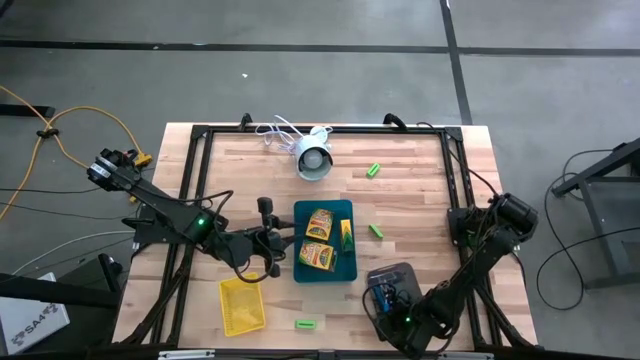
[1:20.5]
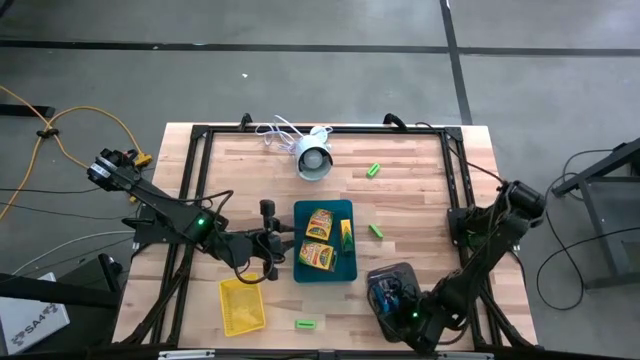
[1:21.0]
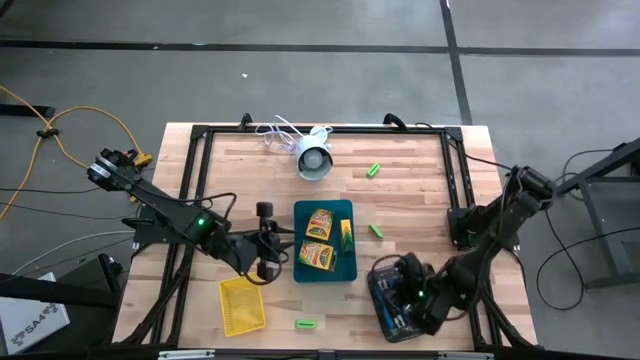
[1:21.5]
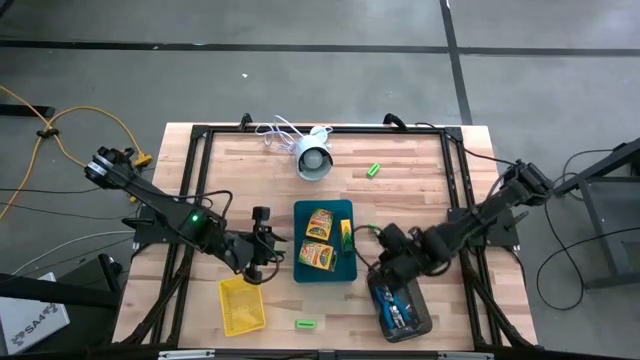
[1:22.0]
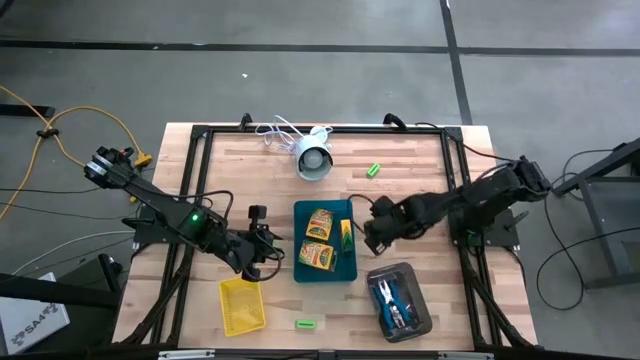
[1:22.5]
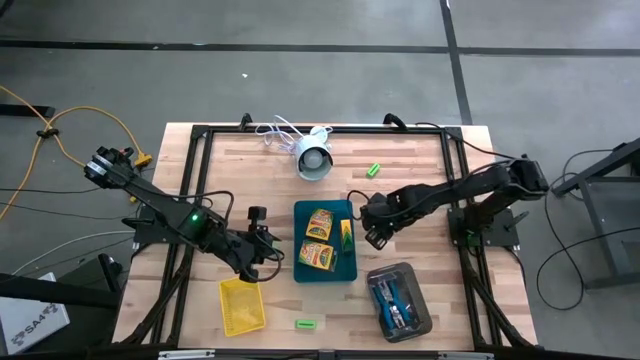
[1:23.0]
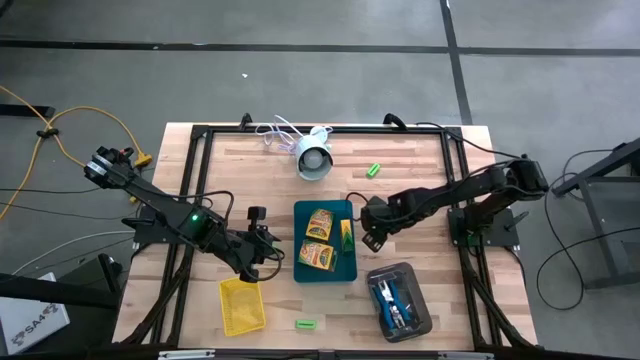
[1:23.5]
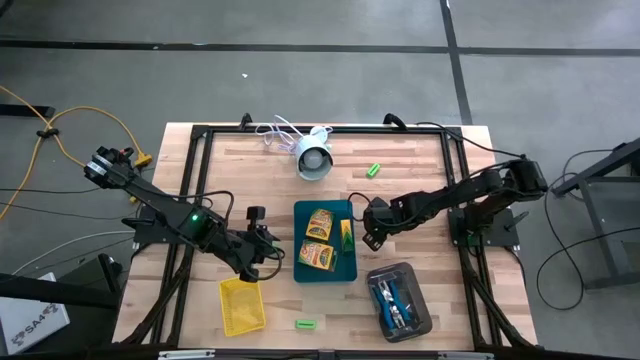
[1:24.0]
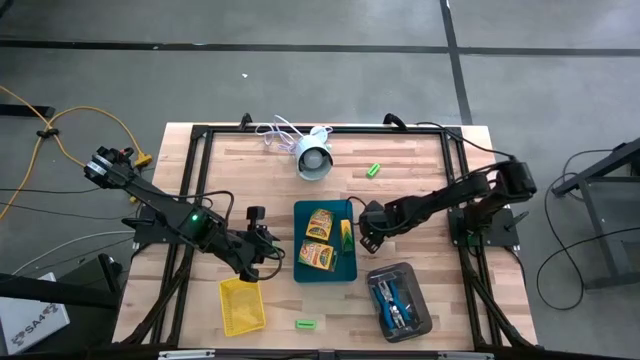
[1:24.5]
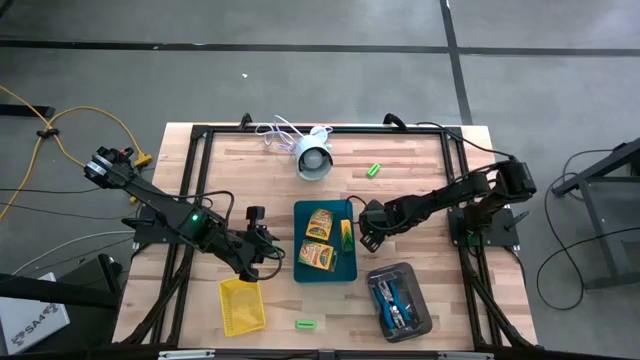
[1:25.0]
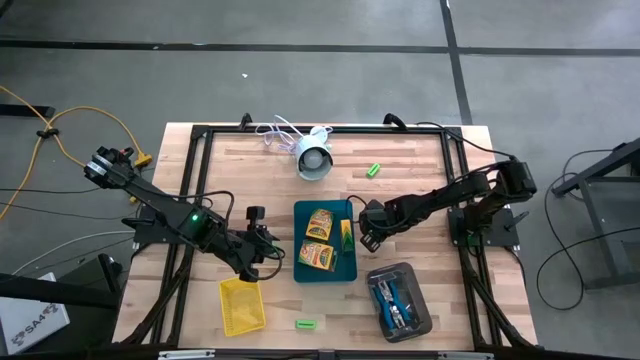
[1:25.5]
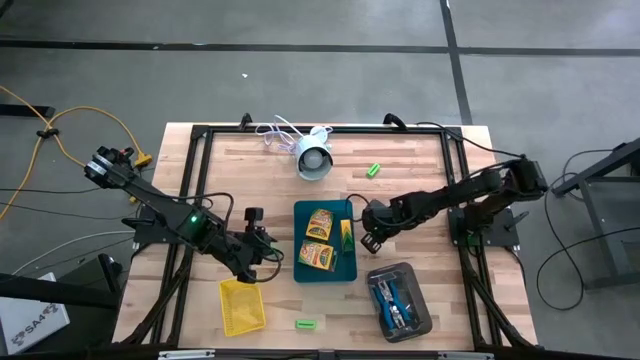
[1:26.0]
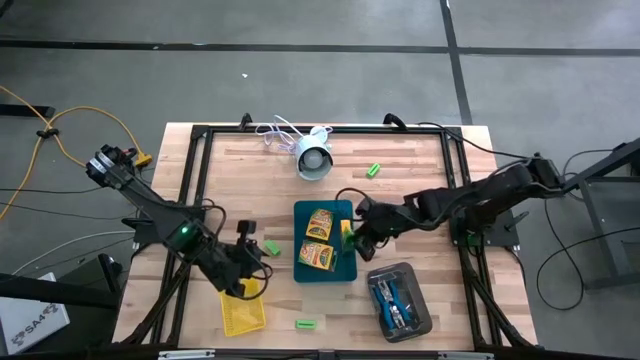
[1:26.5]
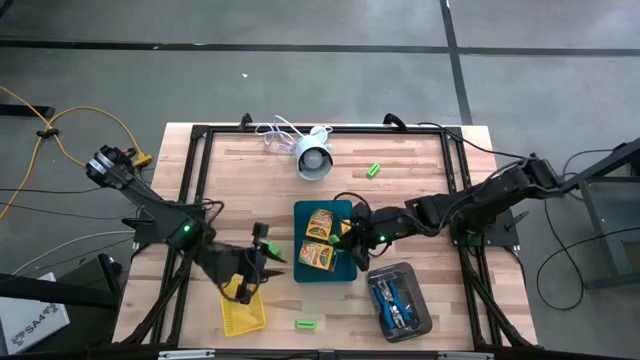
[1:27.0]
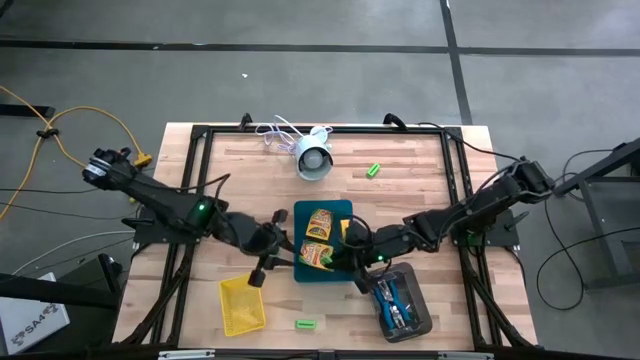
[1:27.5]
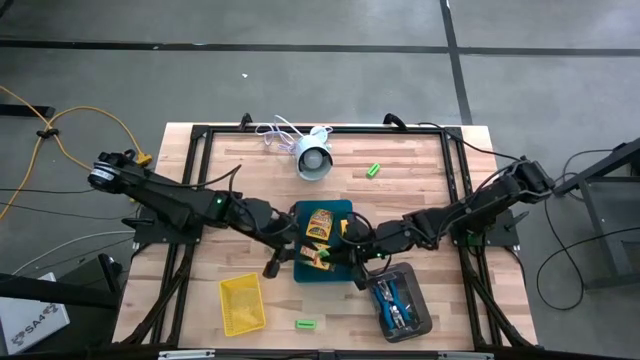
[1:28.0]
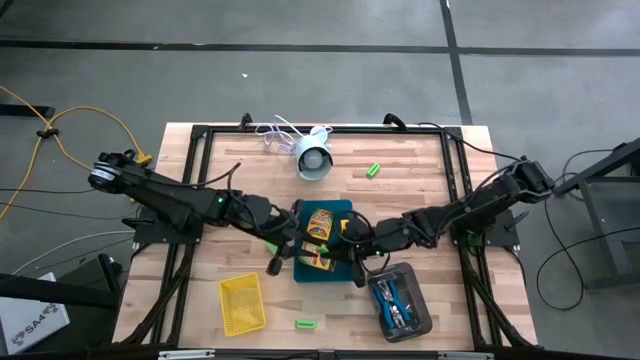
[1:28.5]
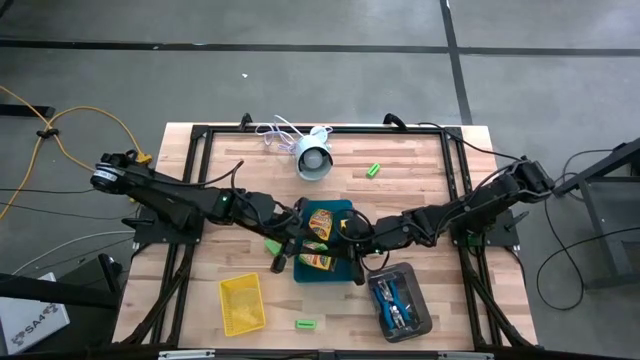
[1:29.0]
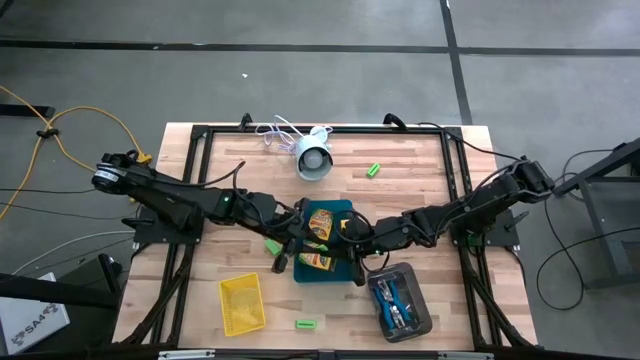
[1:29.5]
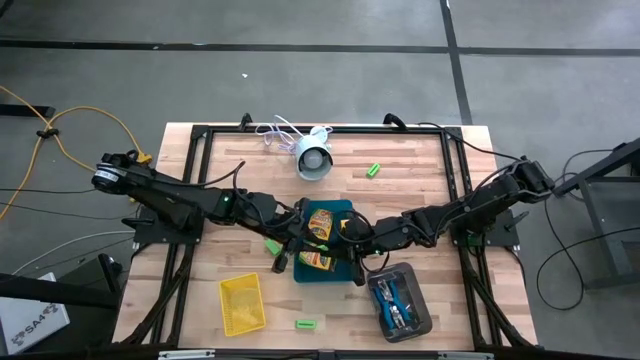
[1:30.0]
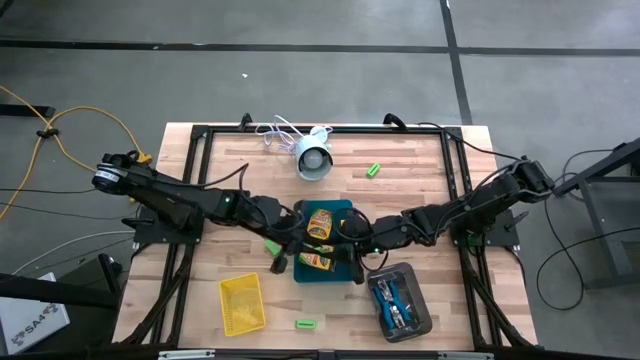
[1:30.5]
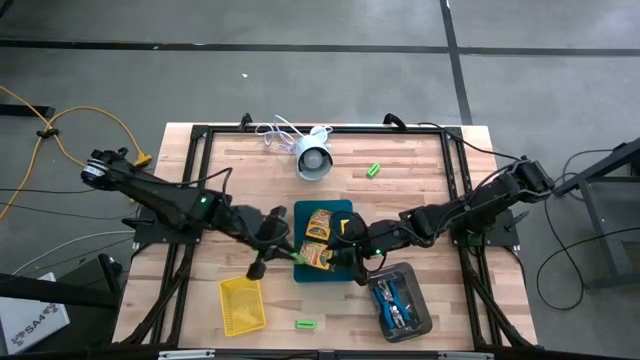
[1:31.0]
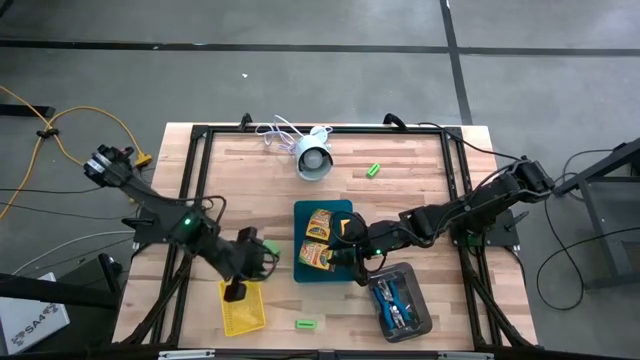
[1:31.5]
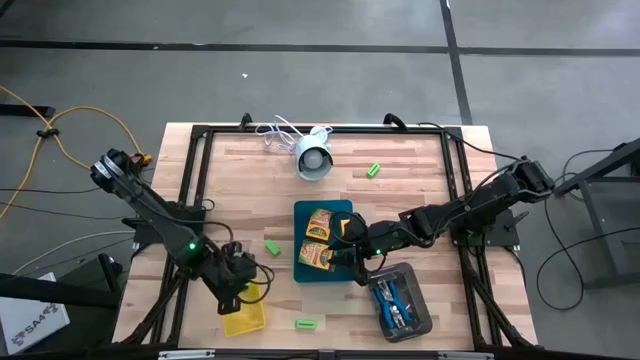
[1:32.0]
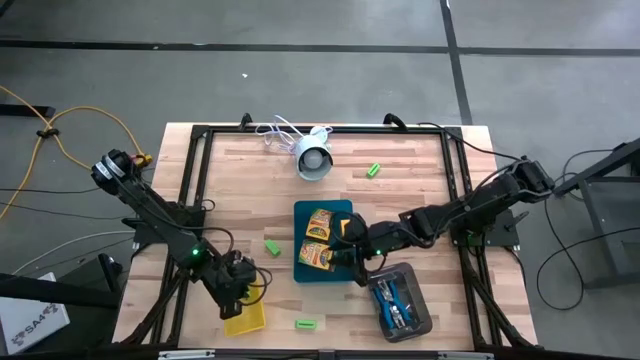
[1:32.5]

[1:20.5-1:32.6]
Task: Pick & Place School Supplies
Put the green eraser into the yellow bin

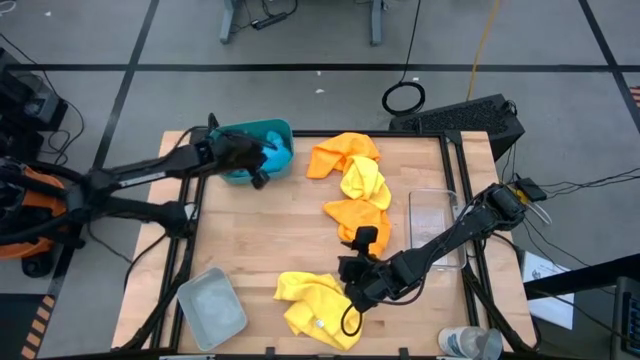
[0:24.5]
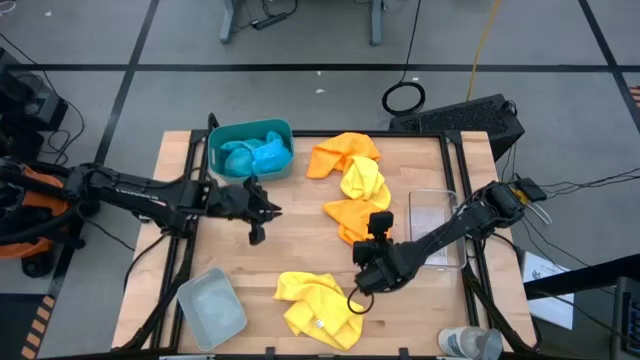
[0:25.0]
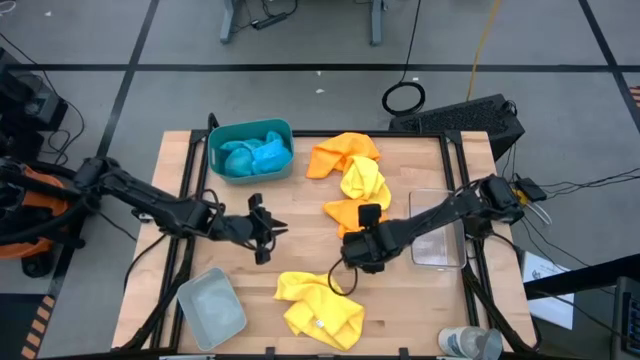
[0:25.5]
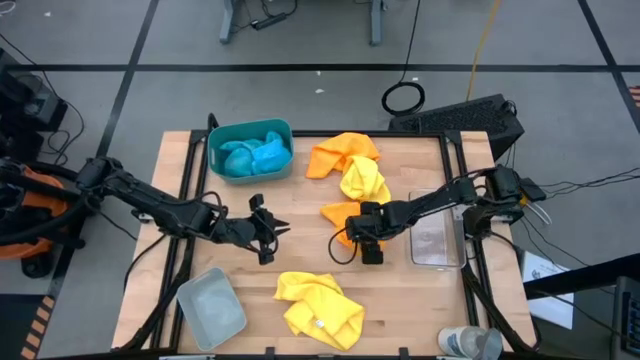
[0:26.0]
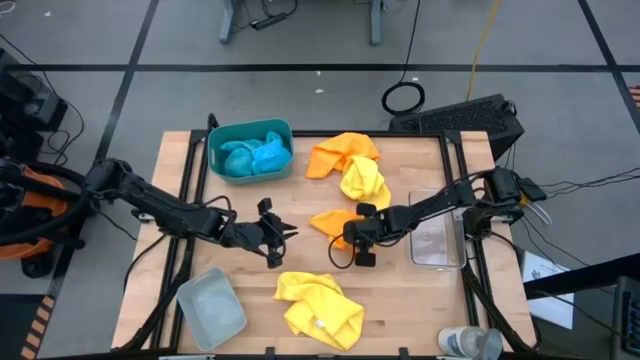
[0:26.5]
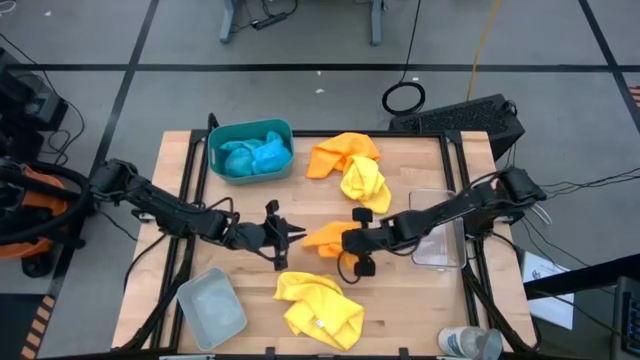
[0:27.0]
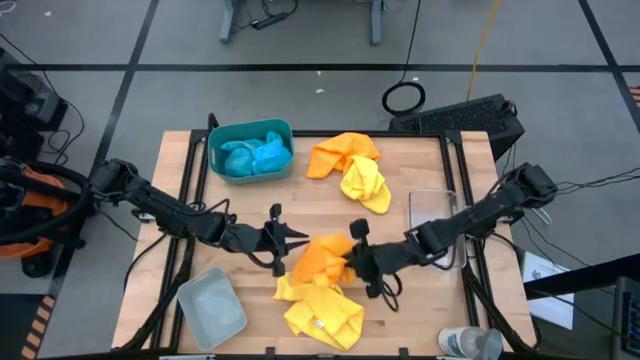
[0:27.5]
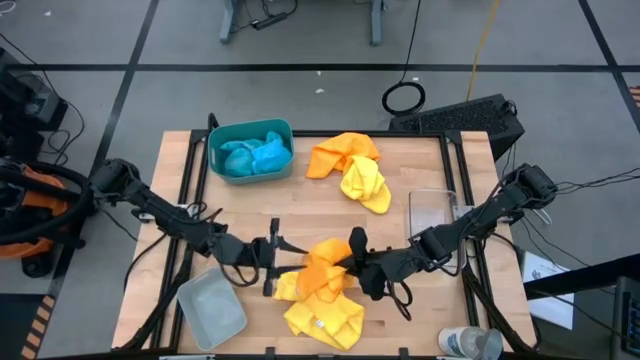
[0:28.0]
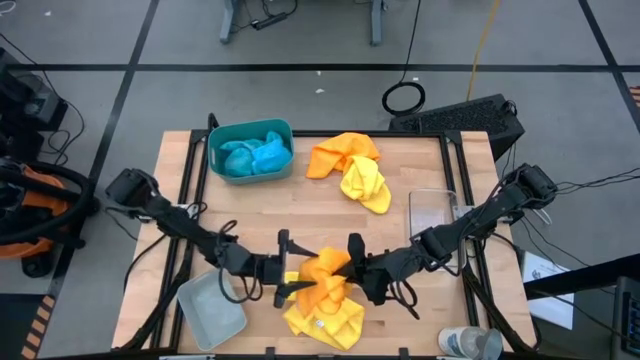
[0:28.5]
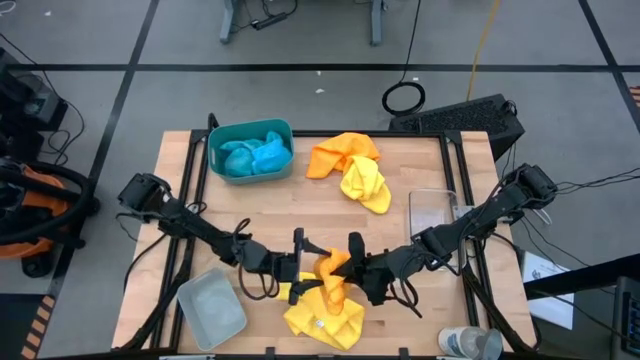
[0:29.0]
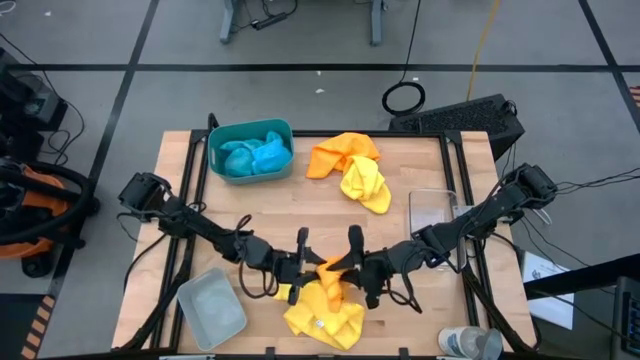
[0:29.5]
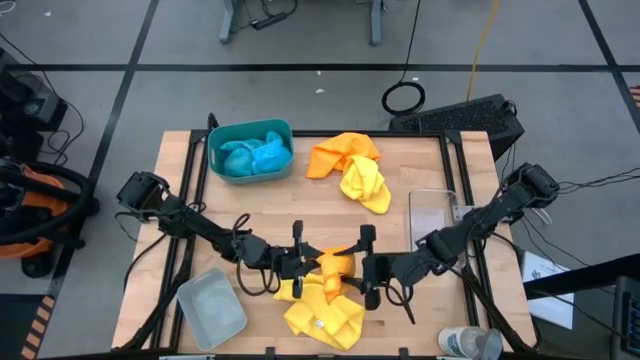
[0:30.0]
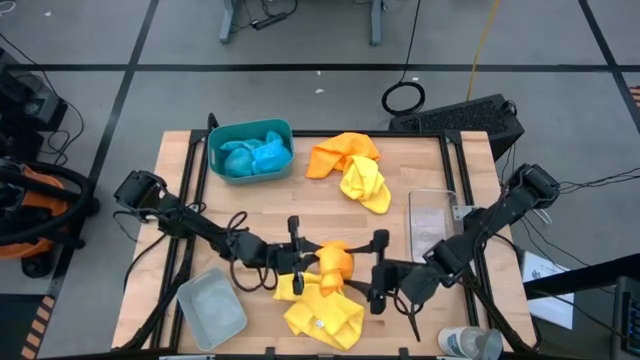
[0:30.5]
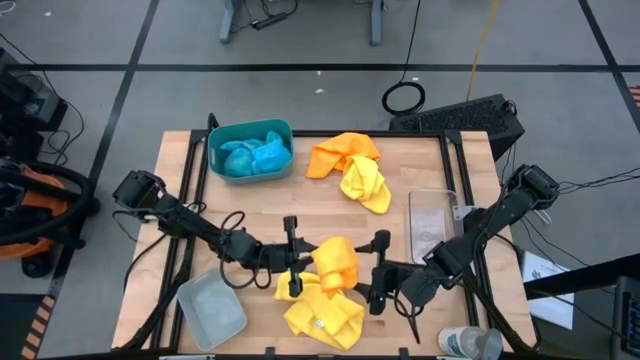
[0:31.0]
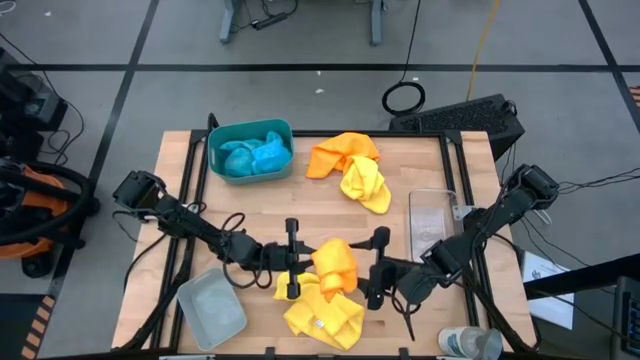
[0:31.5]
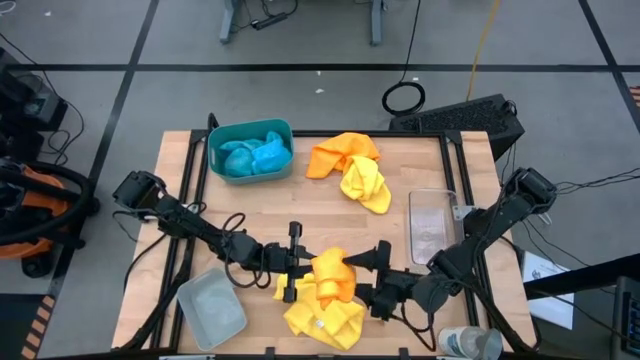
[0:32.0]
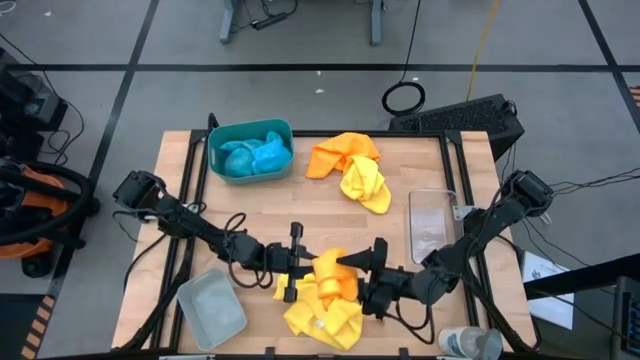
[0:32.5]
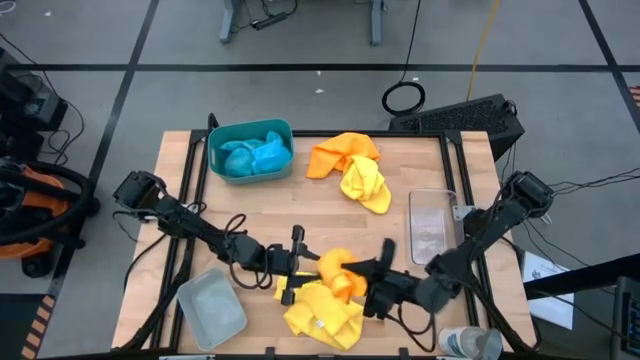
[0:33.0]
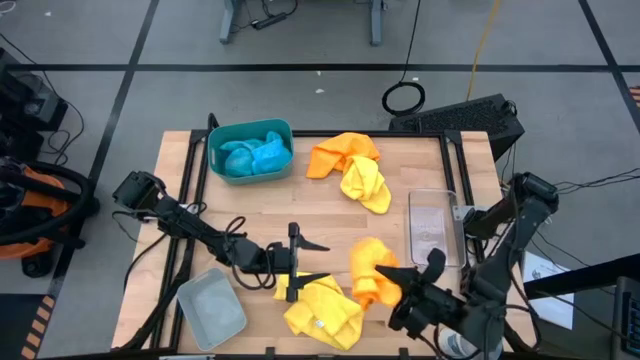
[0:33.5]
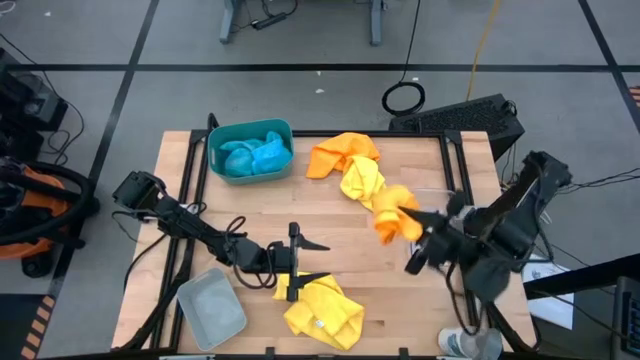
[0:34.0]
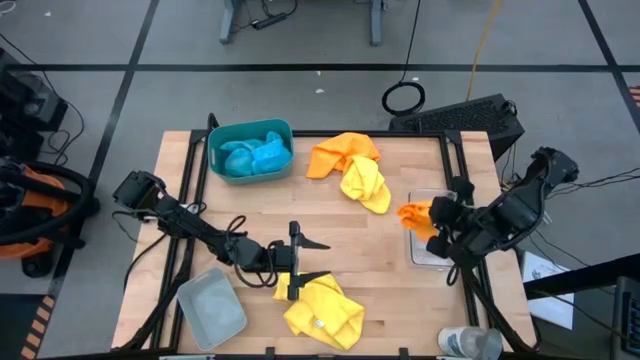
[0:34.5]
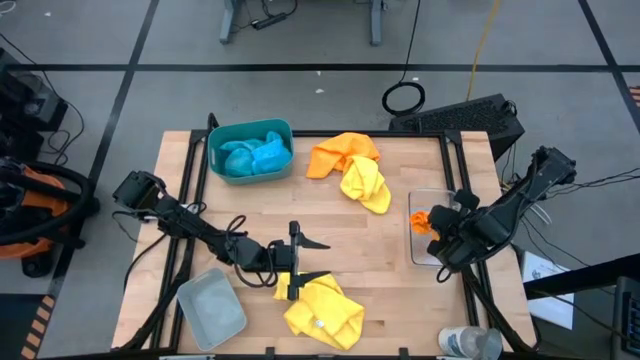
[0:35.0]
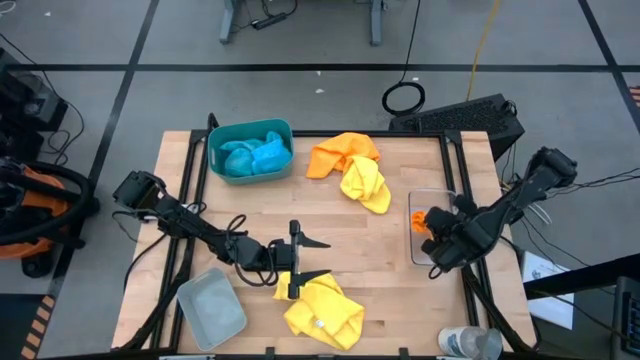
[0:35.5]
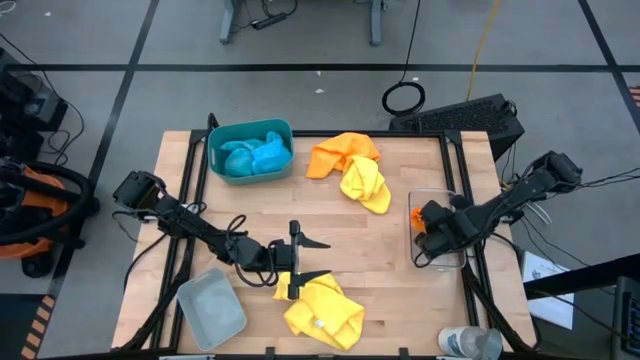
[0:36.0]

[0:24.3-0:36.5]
Task: Sort microfiber towel by color & place in baskets
Put the bottom orange microfiber cloth into the transparent bin
